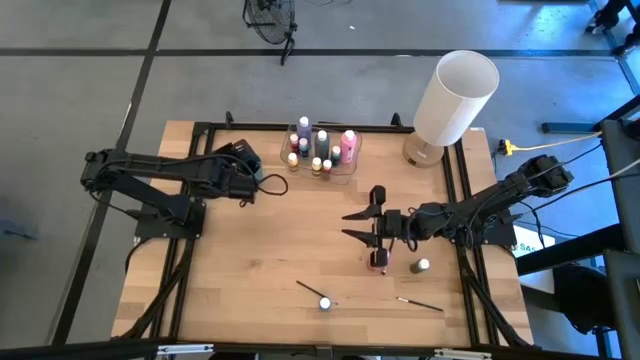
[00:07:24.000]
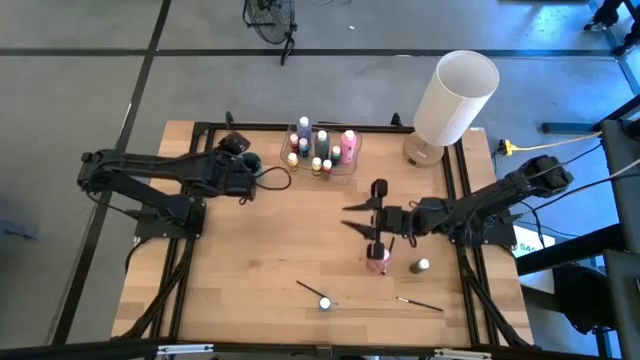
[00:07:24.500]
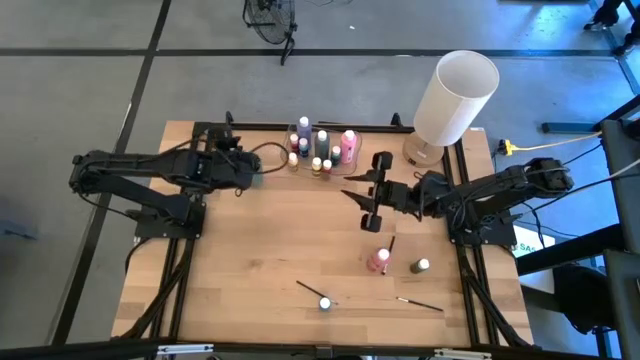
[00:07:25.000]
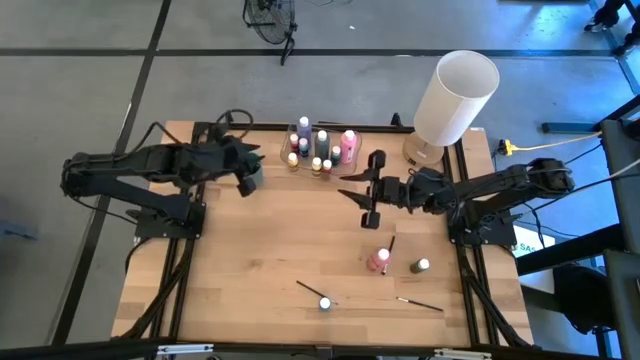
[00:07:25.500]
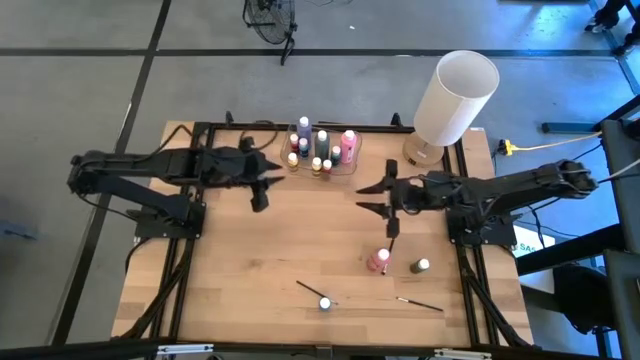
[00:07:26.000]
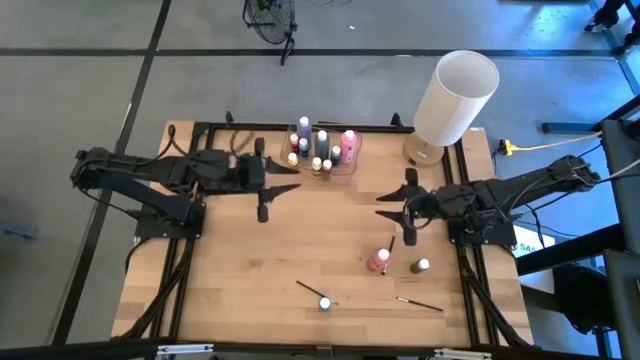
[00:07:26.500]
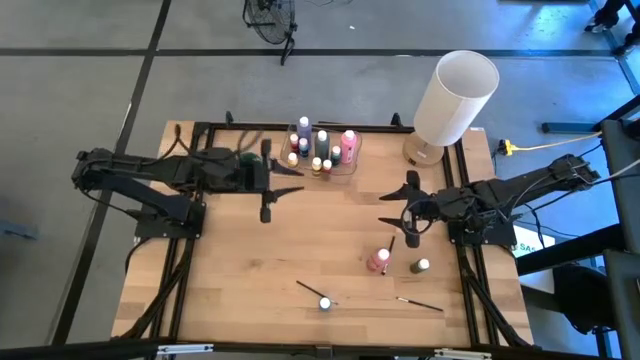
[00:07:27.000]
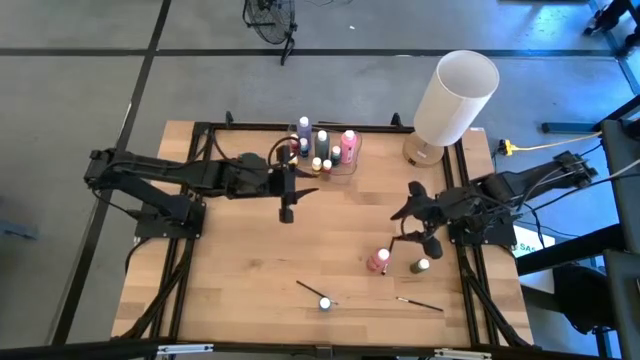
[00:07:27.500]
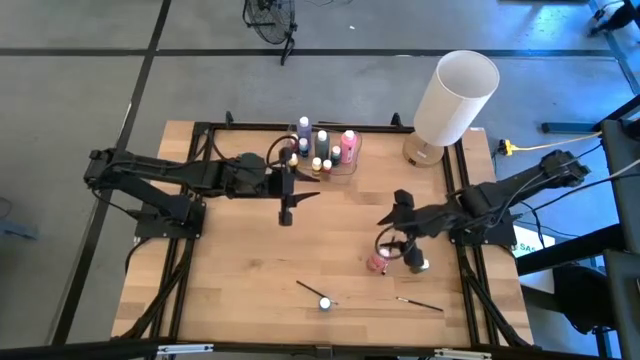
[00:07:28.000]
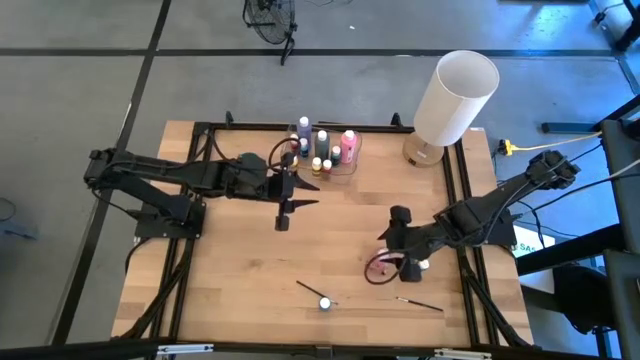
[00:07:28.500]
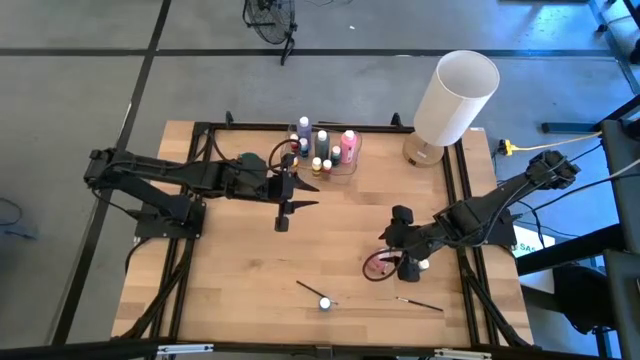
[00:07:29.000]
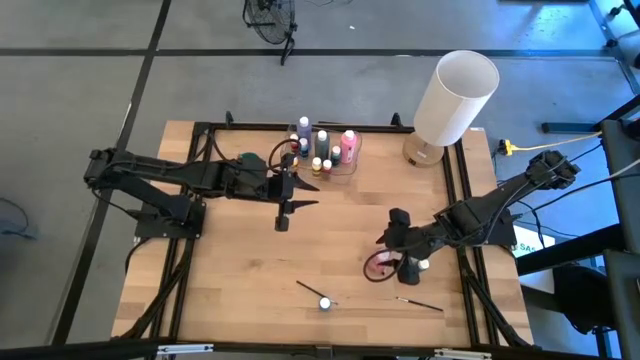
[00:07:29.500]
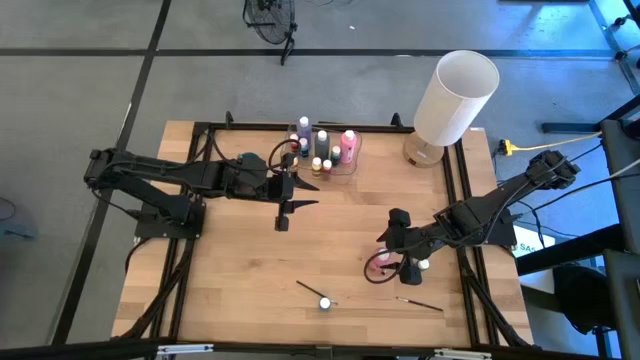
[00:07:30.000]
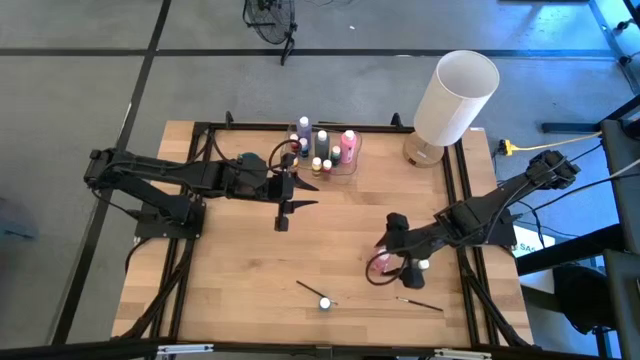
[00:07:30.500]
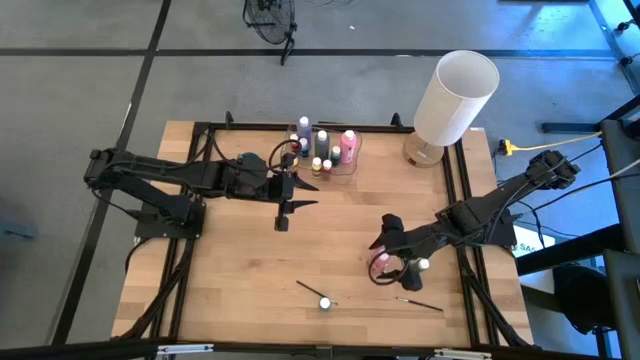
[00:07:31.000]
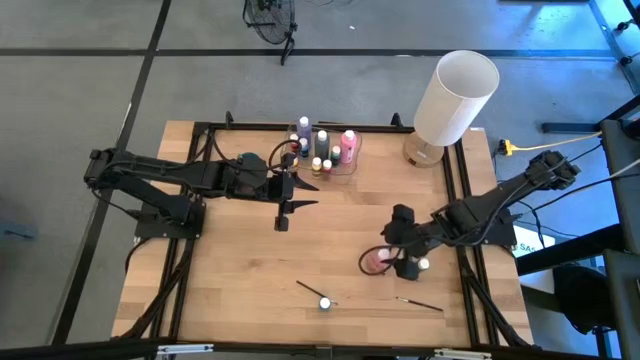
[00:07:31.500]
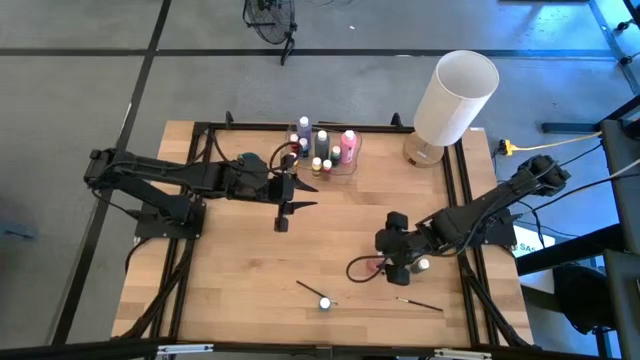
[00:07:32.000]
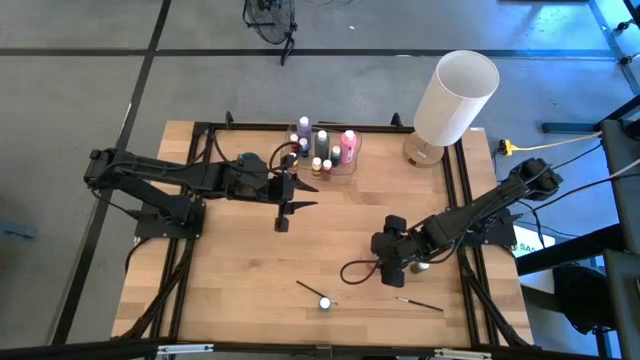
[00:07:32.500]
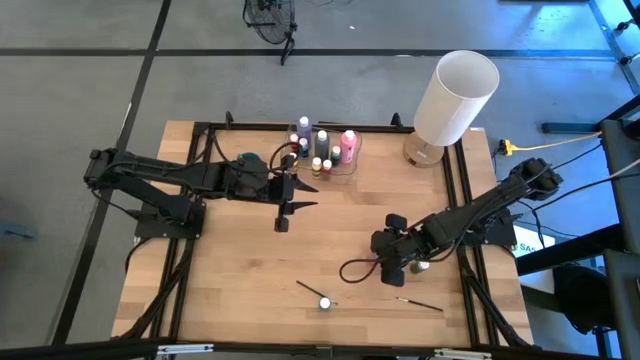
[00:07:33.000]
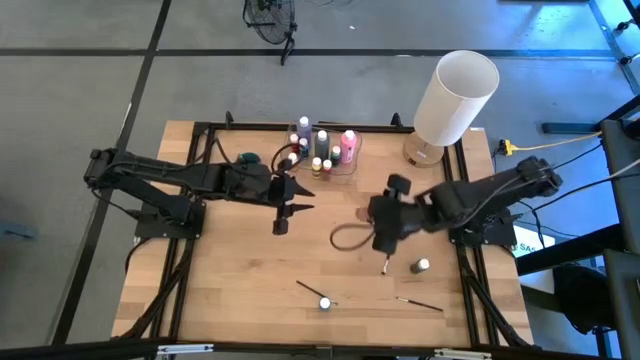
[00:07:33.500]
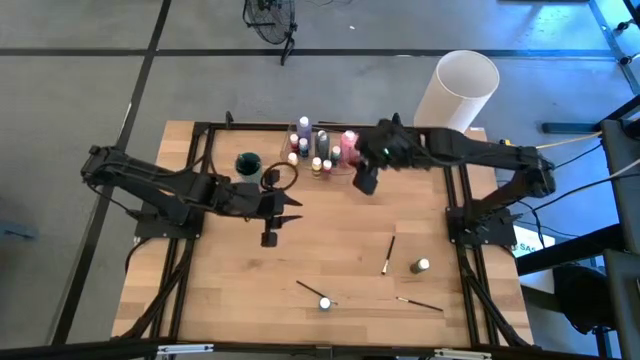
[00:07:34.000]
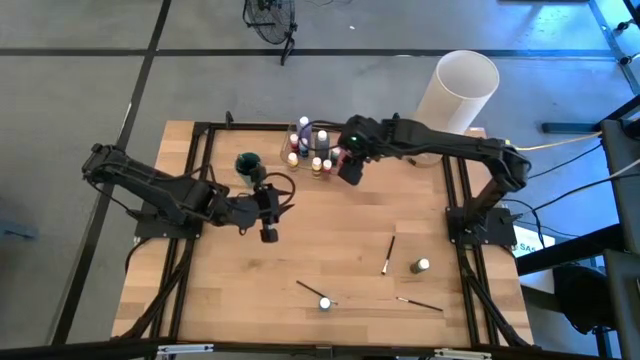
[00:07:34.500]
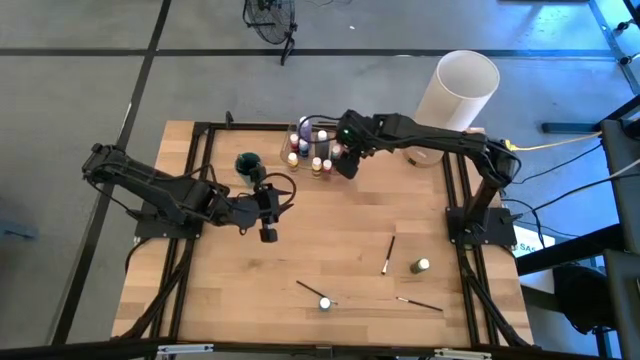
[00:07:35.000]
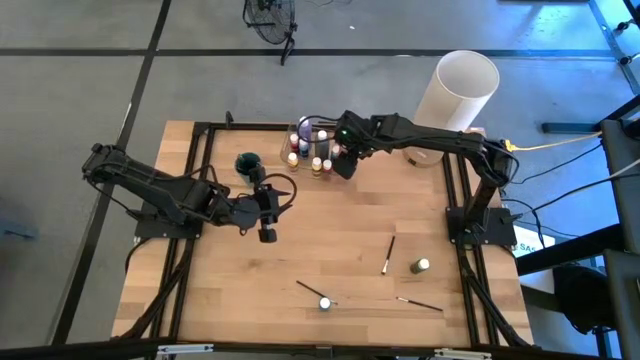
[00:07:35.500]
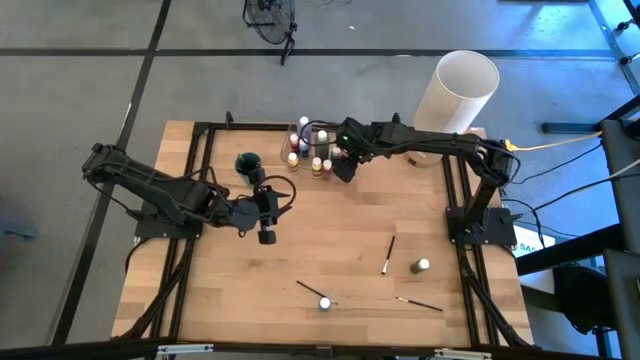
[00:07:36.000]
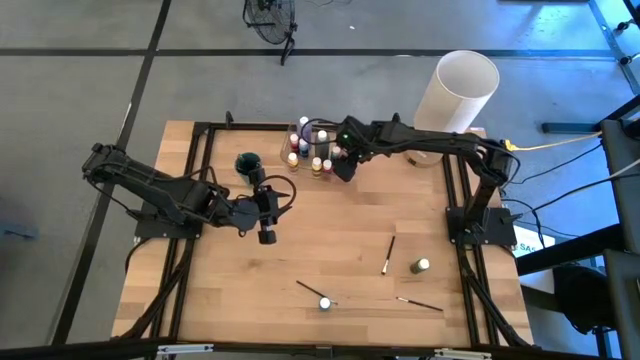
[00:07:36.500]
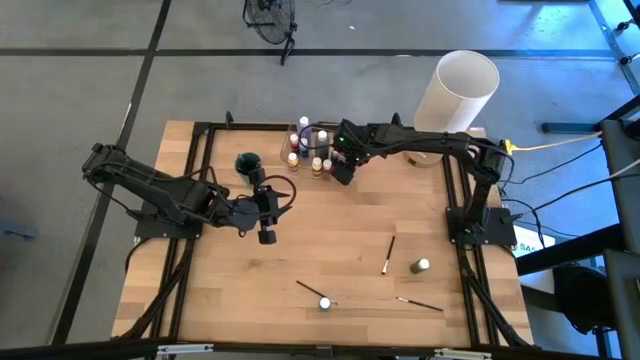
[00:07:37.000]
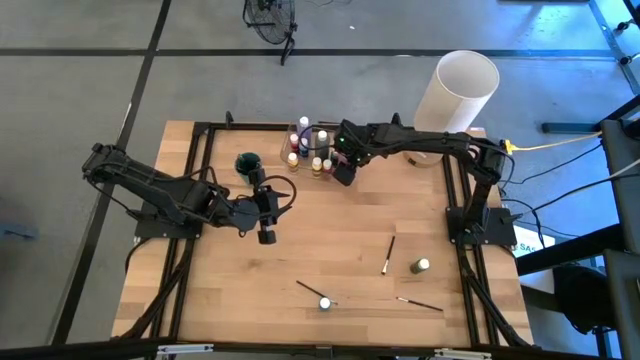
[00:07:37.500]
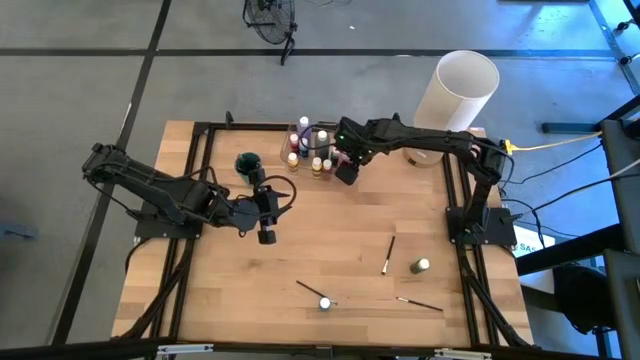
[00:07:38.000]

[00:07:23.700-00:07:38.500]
Task: Pick & Place Paint Supplies
Put the red paint bottle into the transparent bin

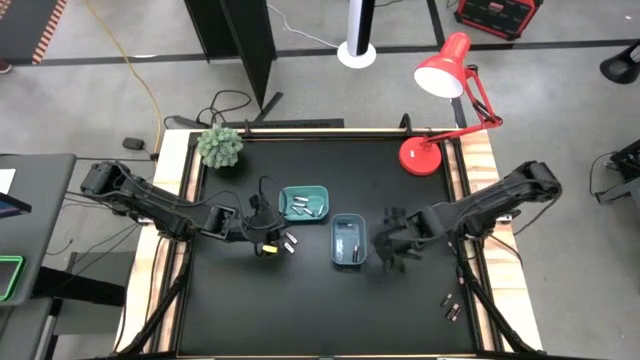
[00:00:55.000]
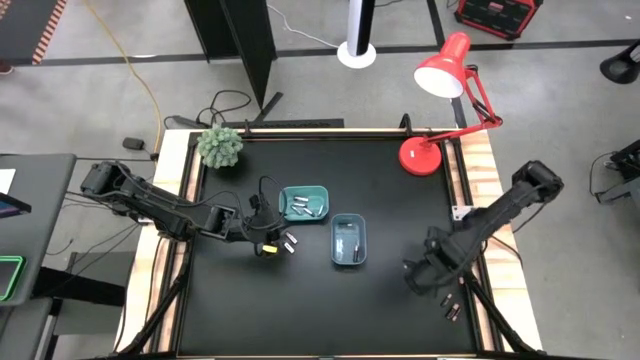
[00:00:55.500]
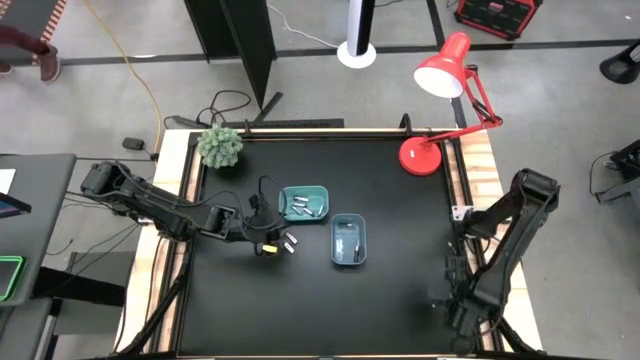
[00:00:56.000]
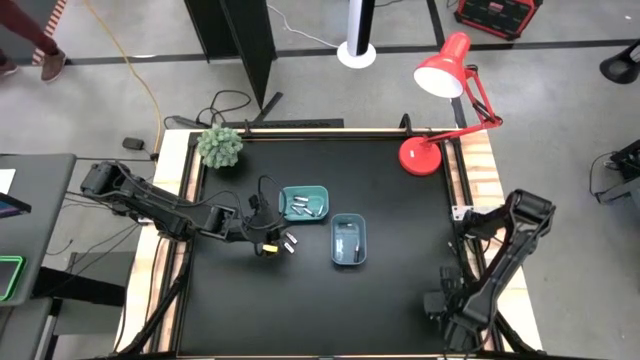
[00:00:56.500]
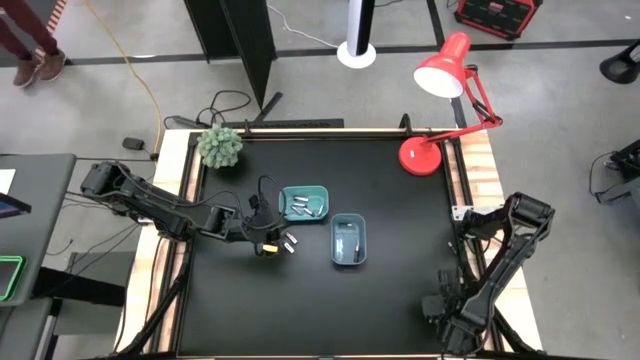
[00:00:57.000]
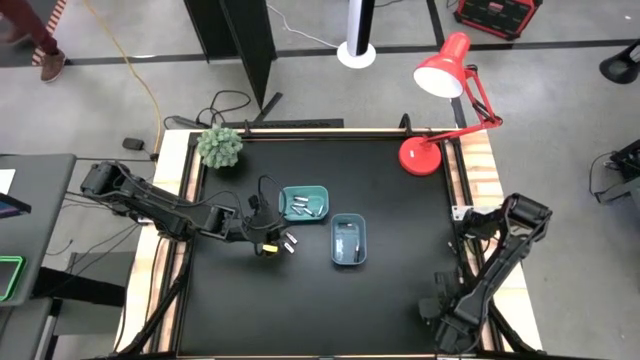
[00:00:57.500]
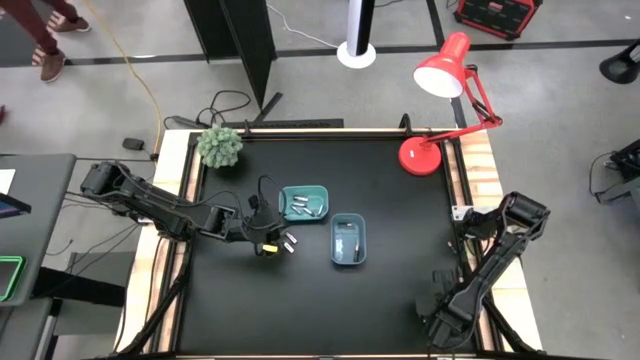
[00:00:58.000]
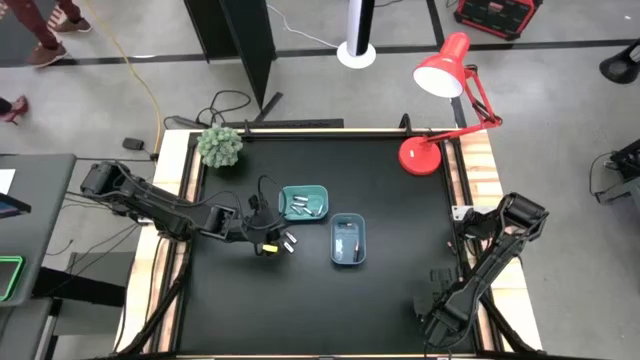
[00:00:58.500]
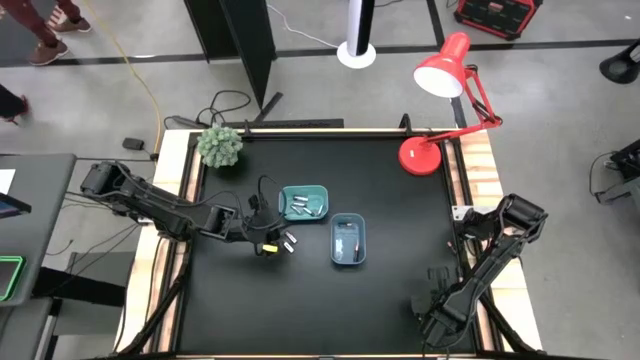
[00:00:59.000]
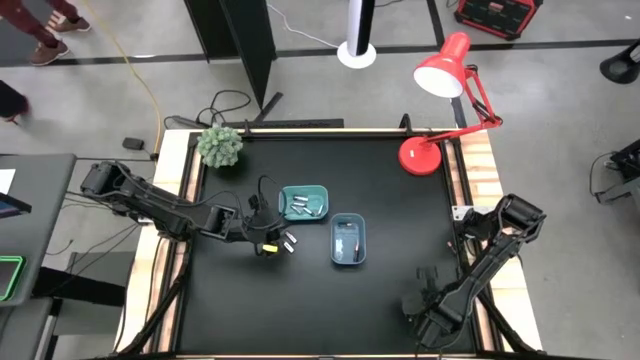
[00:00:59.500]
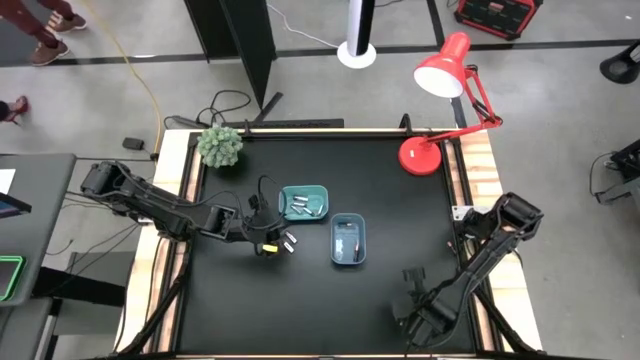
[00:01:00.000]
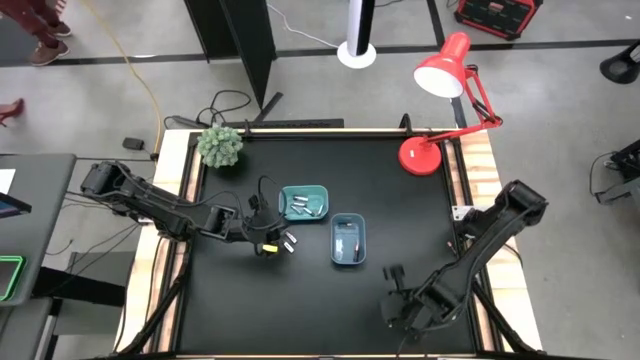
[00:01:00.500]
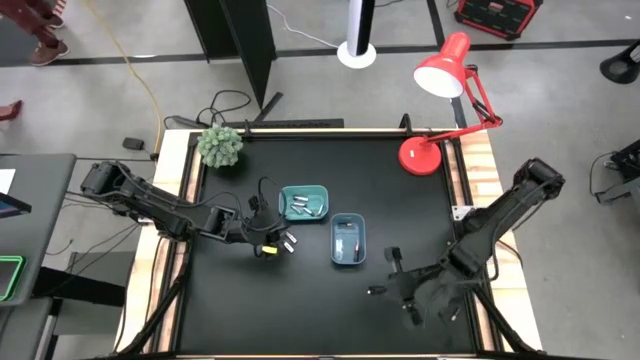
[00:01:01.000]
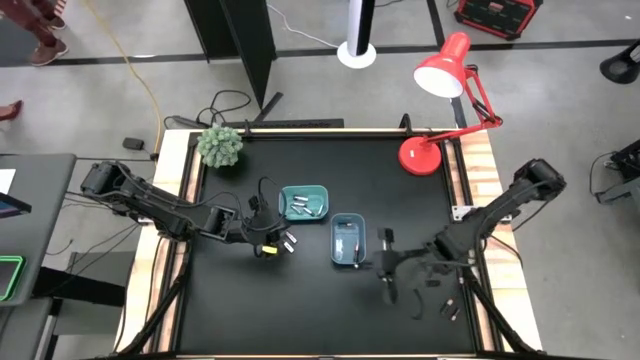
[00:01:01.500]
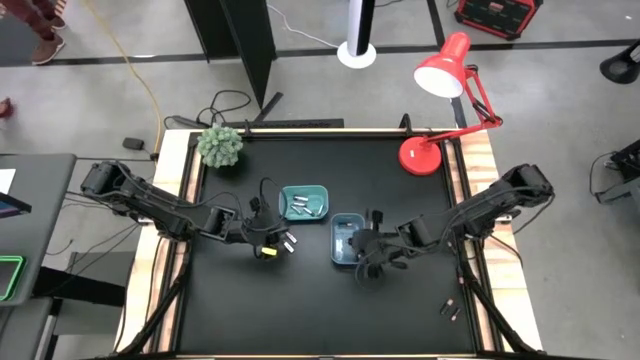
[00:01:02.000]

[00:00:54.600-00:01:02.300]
Task: Sort batteries
Put the black battery into the dark blue bin
